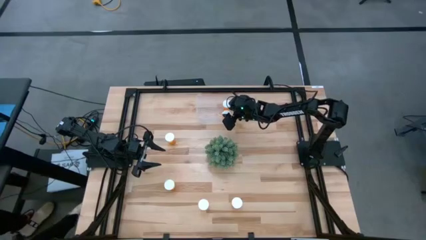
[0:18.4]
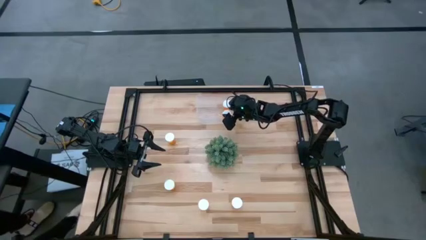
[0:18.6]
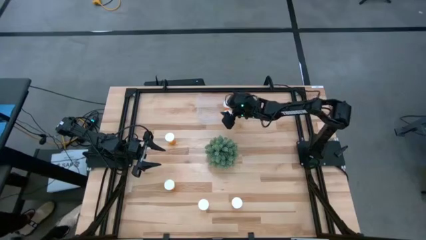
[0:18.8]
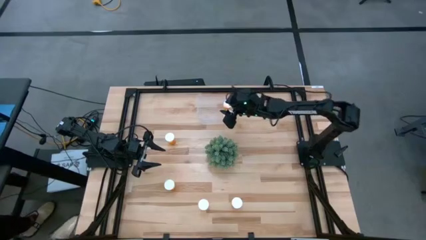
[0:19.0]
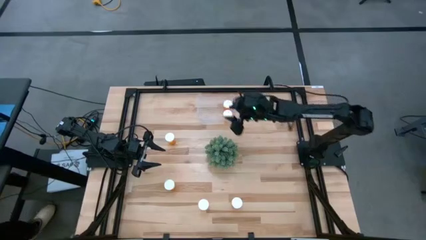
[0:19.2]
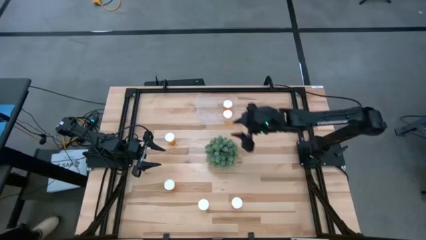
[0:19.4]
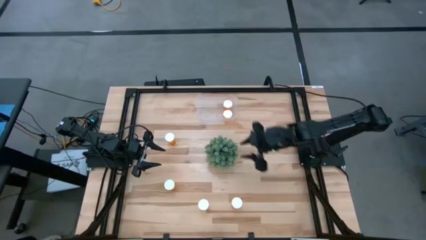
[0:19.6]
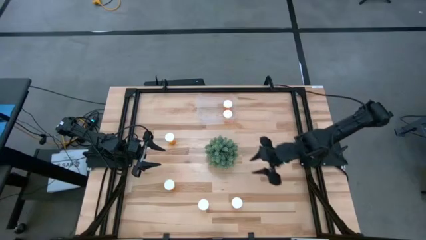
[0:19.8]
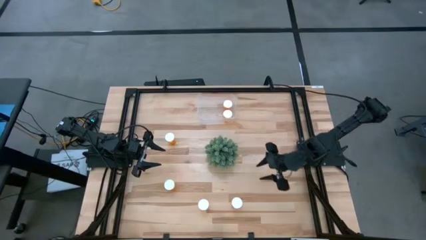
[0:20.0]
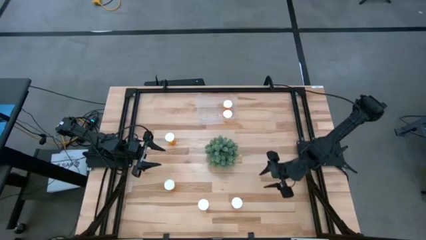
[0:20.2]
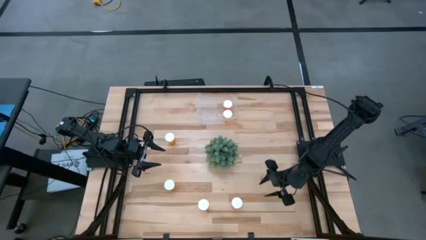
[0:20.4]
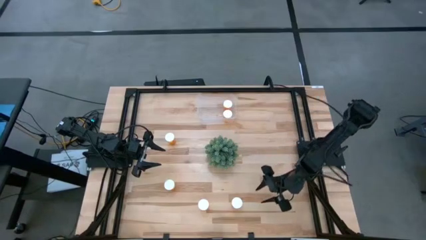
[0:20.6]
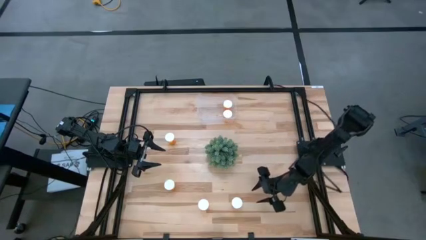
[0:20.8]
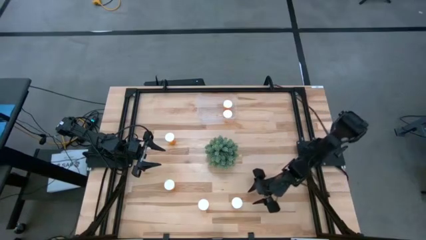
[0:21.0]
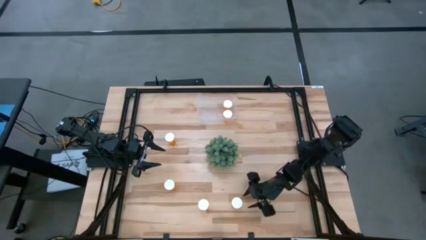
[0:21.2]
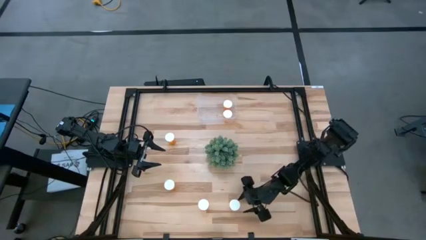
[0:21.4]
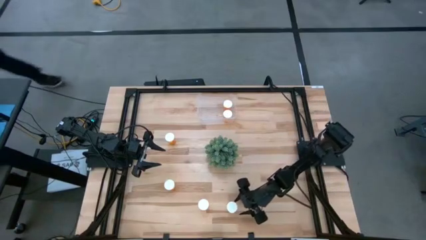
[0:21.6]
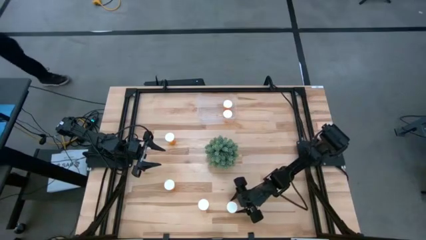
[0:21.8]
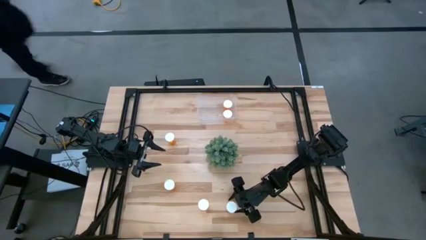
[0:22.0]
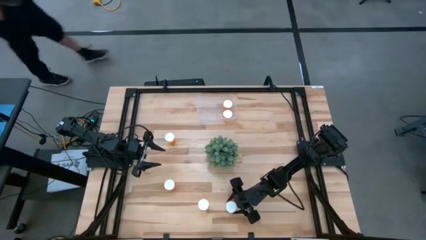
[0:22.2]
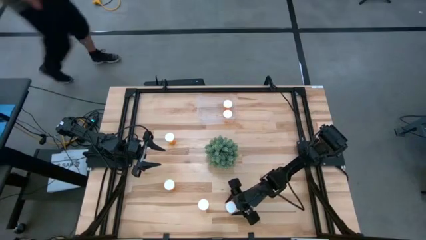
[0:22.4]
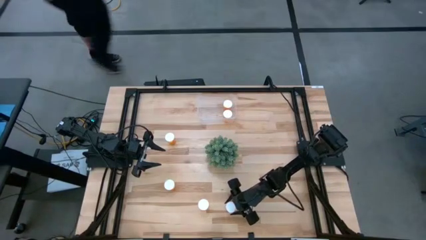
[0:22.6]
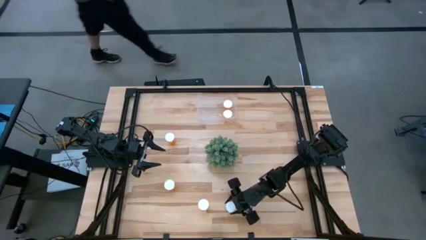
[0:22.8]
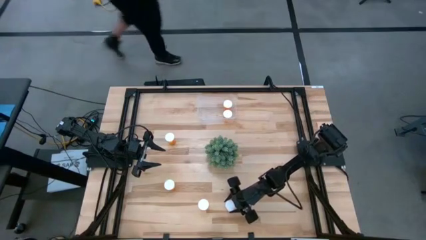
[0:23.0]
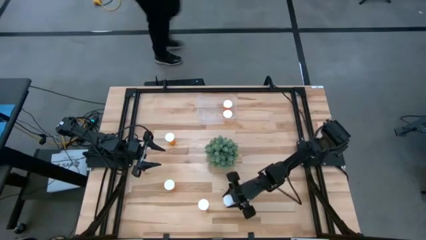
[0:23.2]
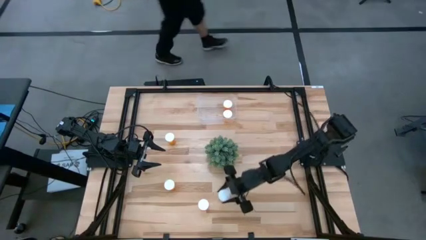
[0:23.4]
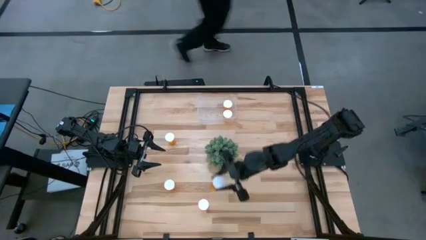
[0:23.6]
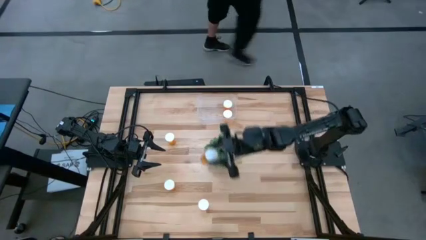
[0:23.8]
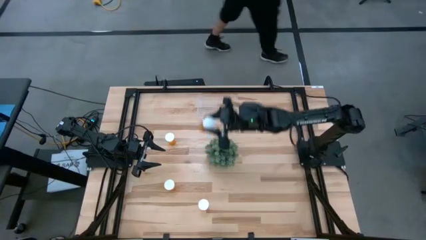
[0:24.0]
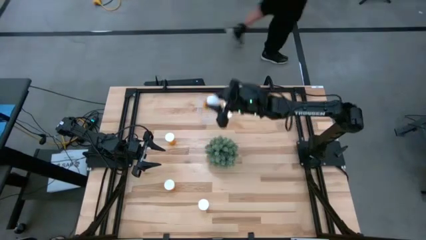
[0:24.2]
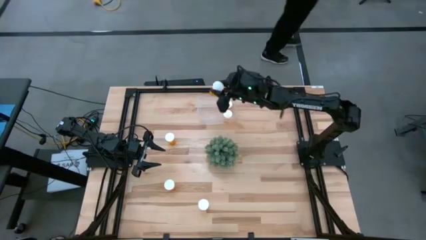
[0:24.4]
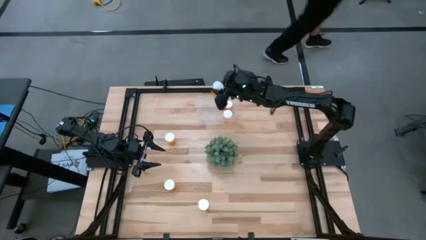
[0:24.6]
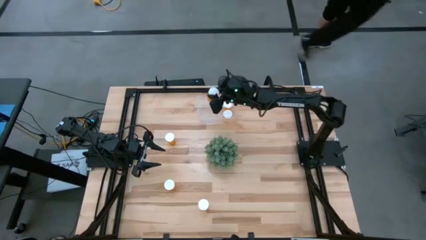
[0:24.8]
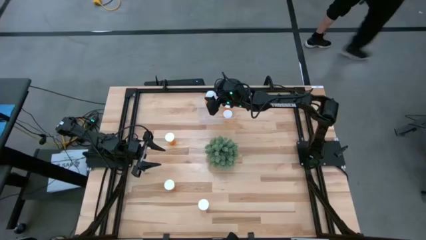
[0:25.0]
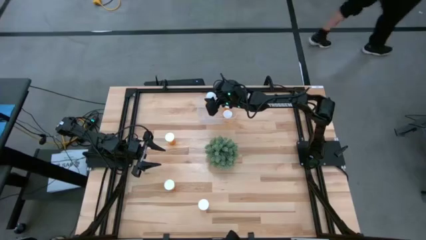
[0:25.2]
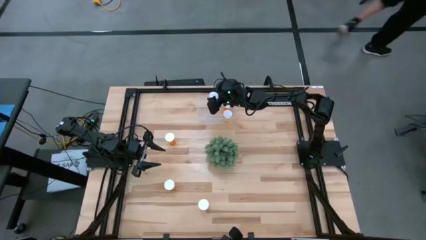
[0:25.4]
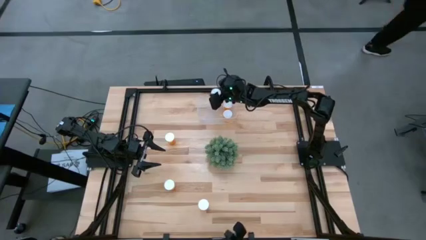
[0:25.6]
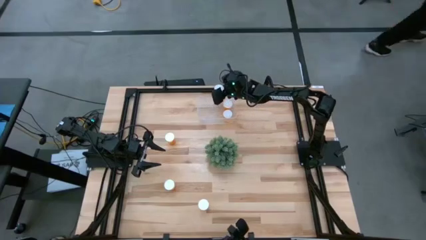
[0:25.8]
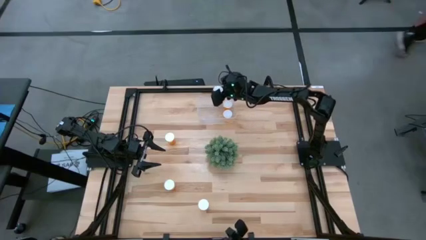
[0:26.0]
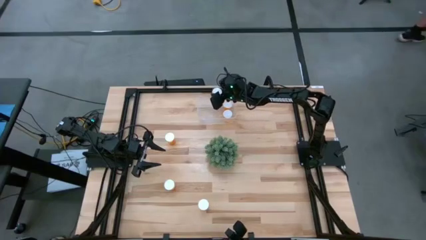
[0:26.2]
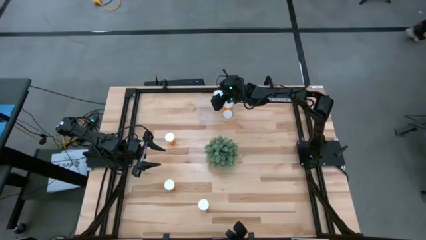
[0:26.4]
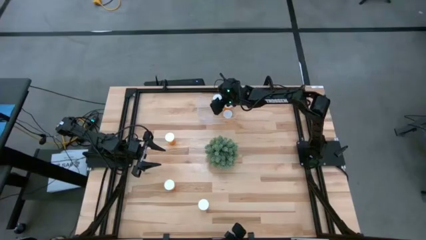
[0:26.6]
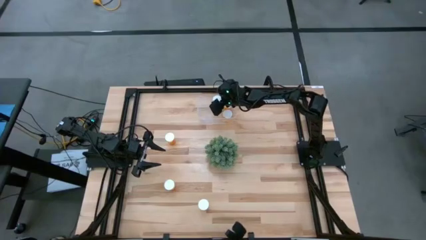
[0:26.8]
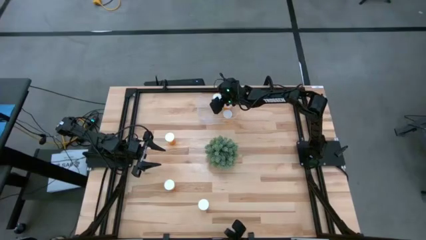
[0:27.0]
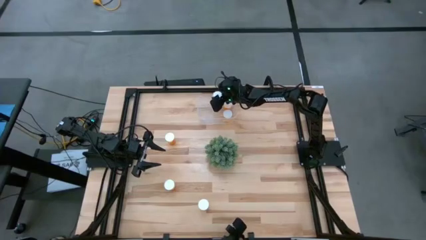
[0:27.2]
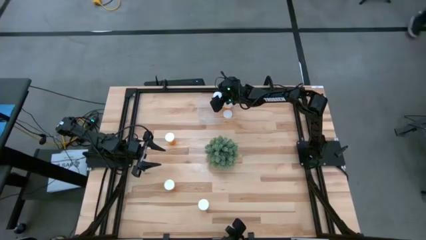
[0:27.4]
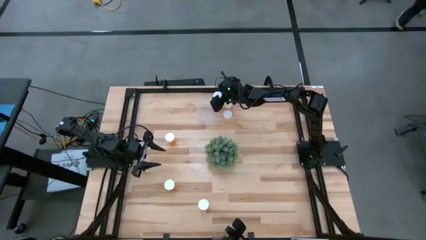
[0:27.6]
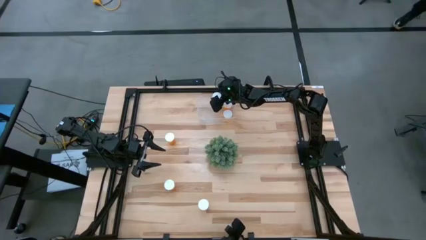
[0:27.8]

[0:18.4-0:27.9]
Task: Pick and place pill bottles into a basket
Put the orange pill bottle into the transparent bin

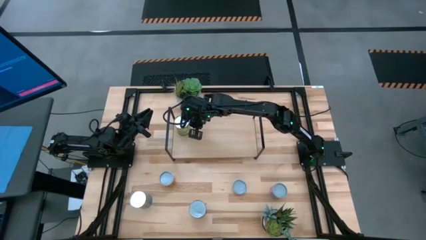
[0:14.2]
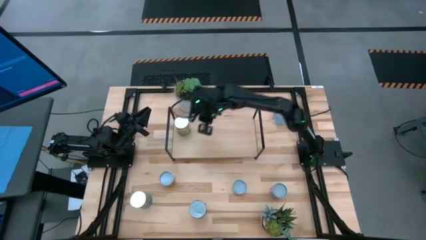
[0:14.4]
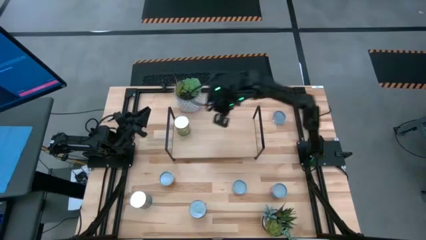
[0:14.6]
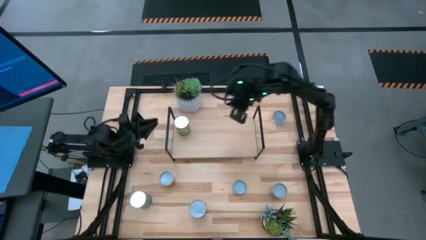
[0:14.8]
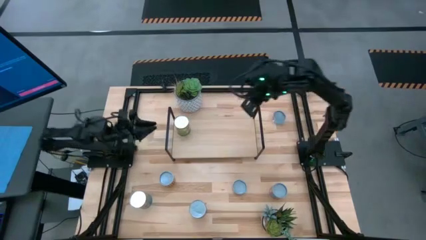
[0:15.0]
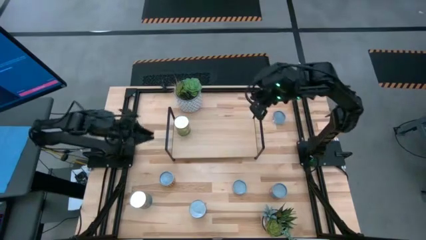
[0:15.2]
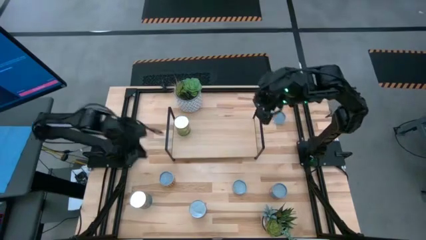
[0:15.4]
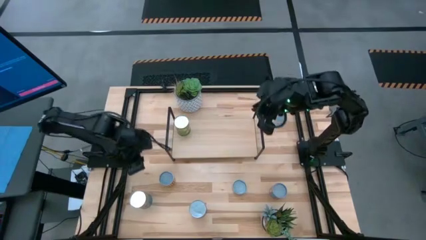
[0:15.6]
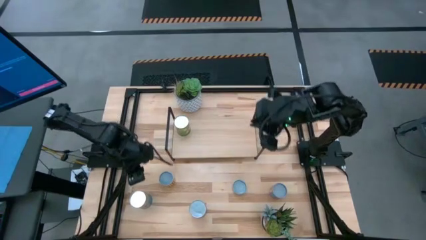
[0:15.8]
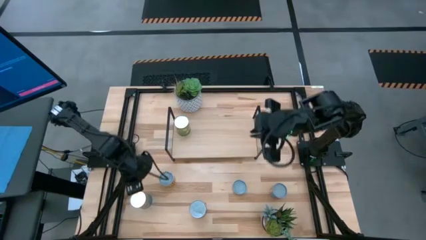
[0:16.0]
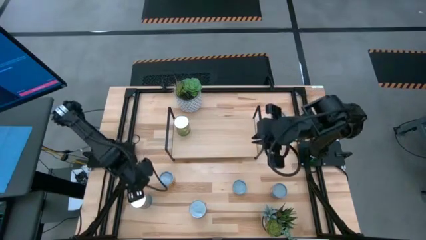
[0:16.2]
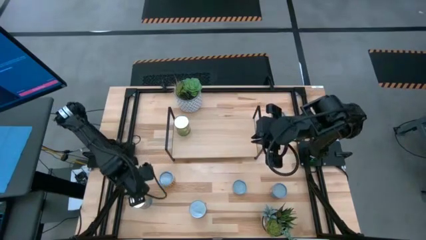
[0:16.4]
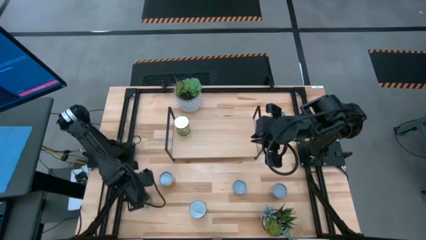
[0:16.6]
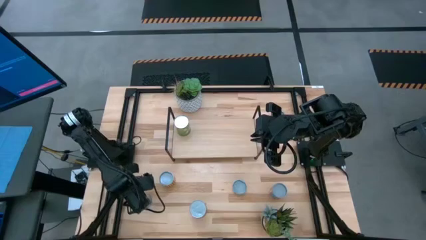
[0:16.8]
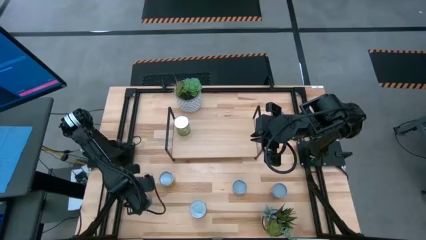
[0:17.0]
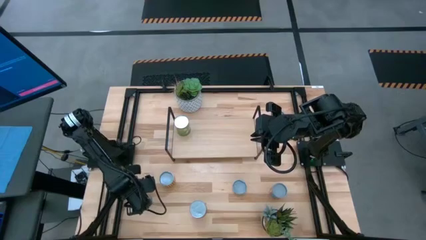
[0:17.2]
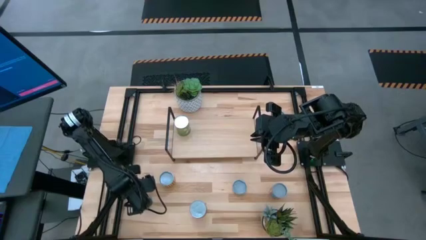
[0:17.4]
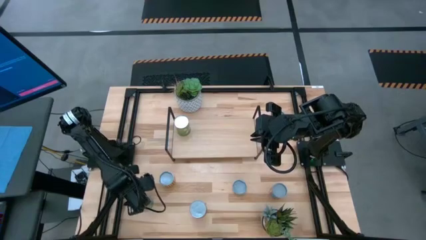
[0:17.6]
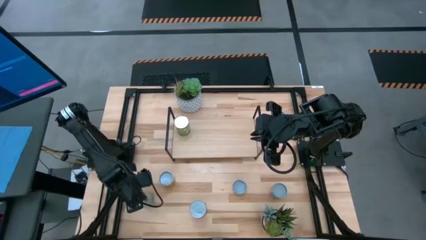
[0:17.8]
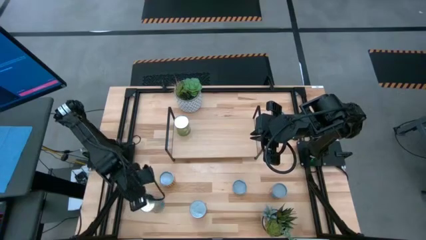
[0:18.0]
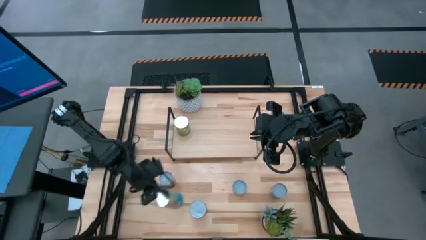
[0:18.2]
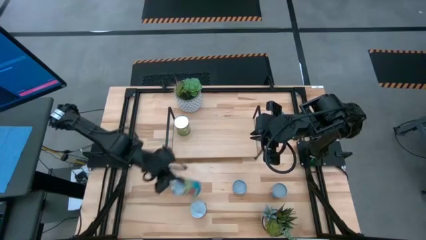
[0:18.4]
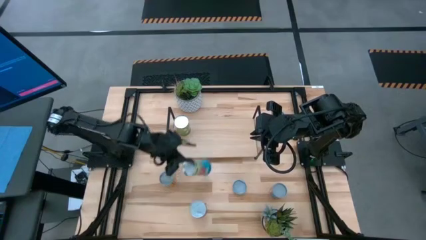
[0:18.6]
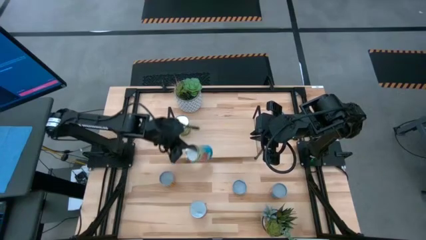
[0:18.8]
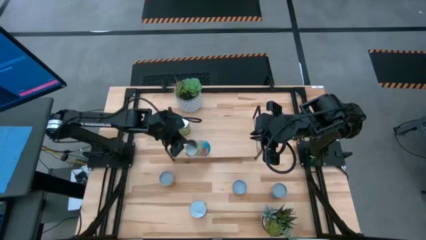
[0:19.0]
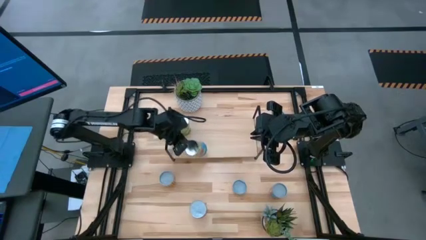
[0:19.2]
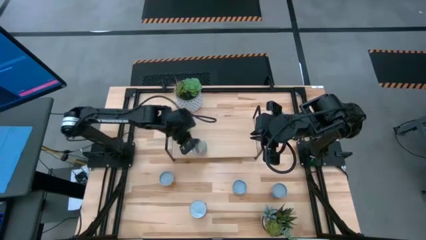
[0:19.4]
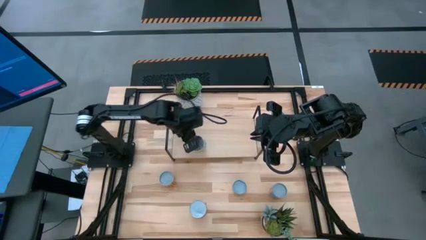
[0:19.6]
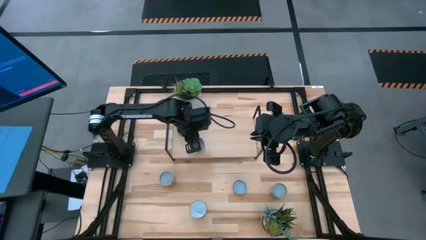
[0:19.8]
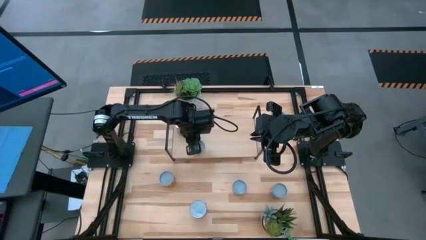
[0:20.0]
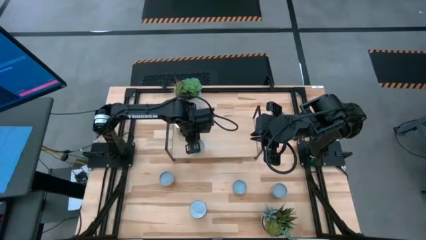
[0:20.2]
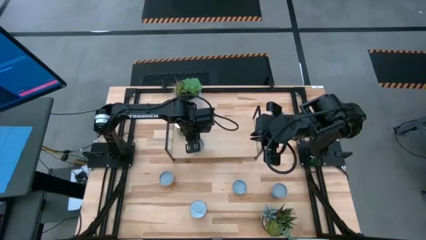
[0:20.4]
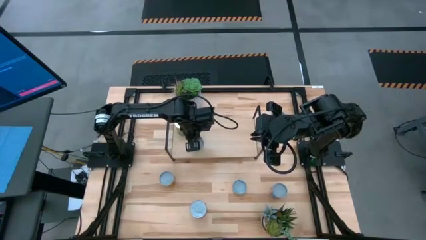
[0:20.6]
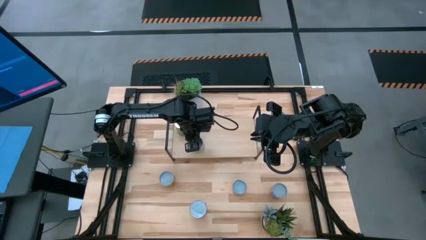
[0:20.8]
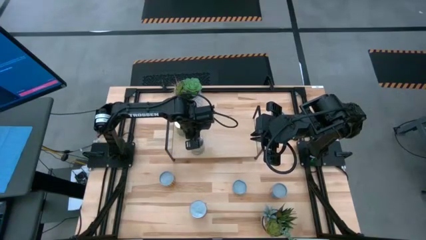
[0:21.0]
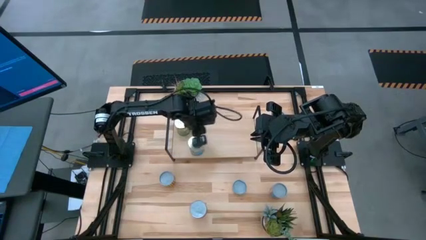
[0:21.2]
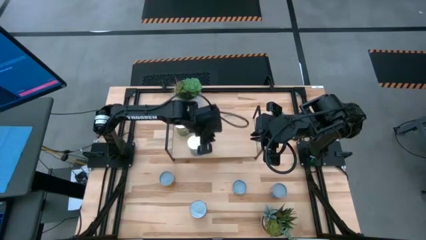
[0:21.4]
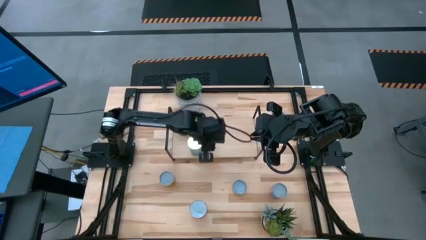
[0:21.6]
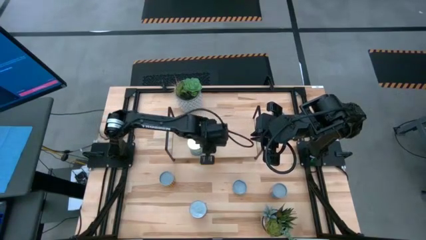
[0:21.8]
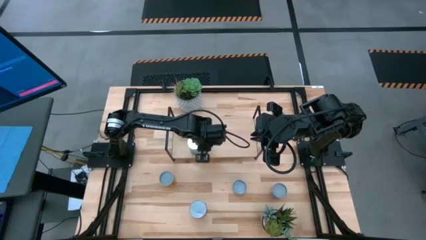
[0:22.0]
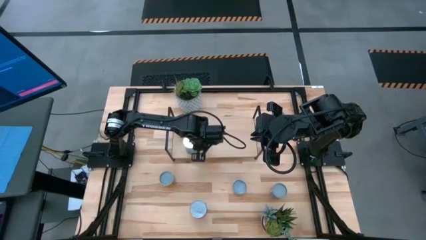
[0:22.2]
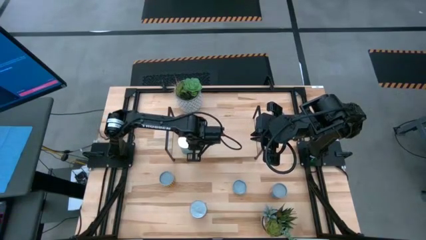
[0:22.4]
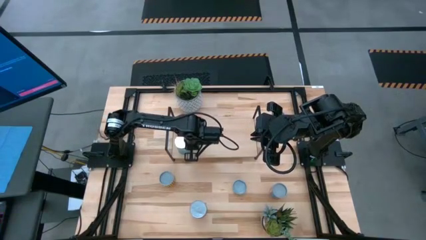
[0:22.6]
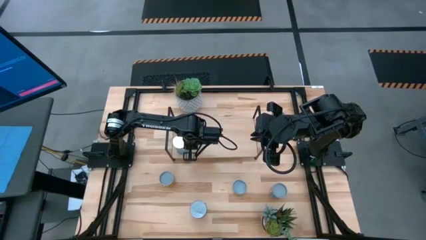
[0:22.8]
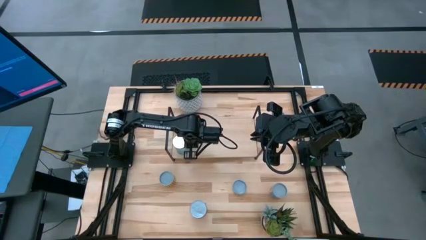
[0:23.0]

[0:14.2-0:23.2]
Task: Pick and place cans onto a shelf
Put the canned tomatoes on the shelf
